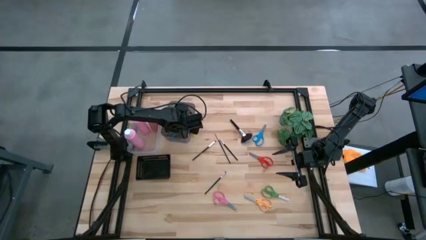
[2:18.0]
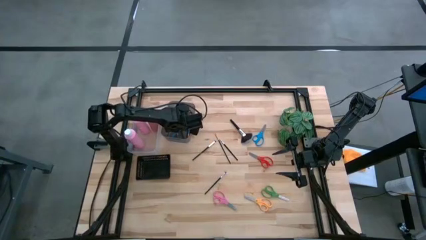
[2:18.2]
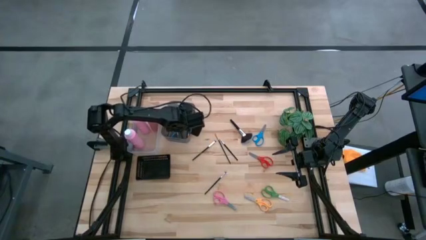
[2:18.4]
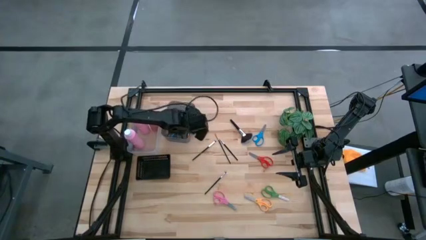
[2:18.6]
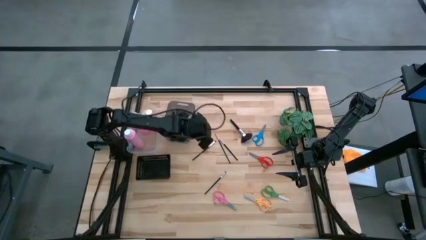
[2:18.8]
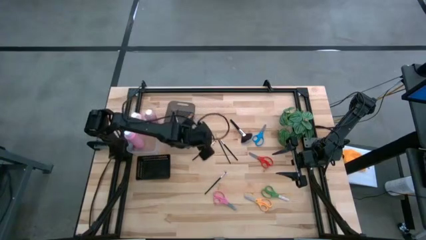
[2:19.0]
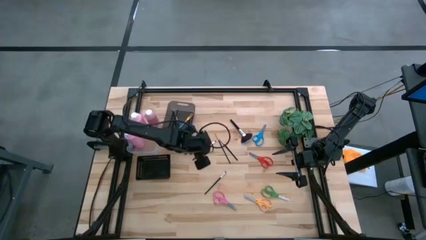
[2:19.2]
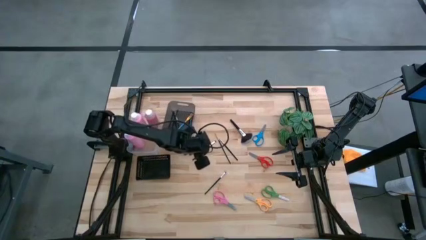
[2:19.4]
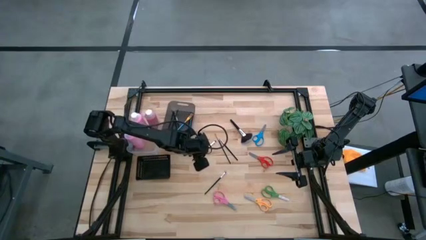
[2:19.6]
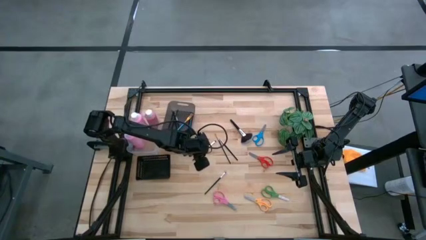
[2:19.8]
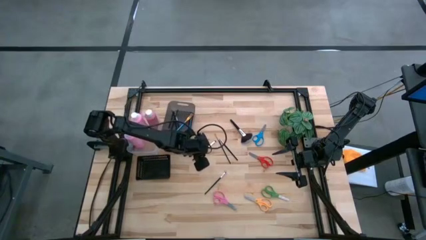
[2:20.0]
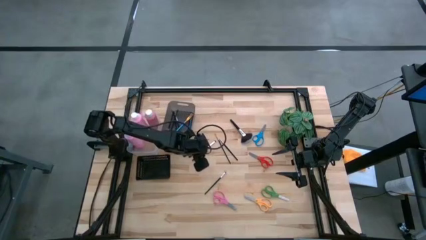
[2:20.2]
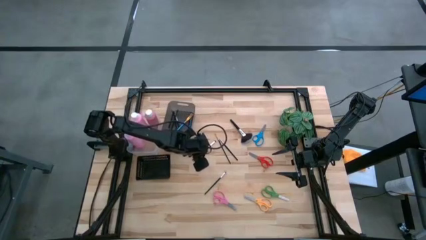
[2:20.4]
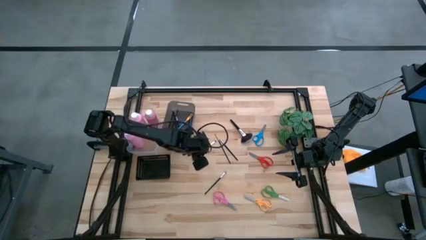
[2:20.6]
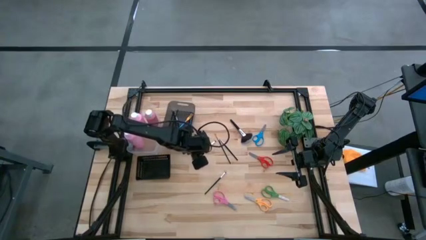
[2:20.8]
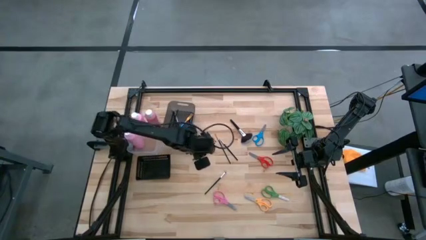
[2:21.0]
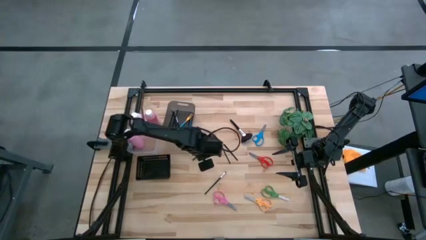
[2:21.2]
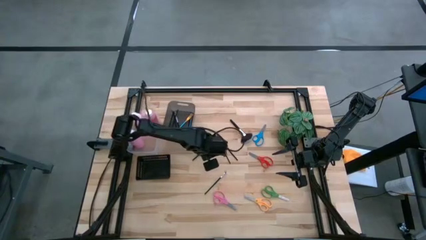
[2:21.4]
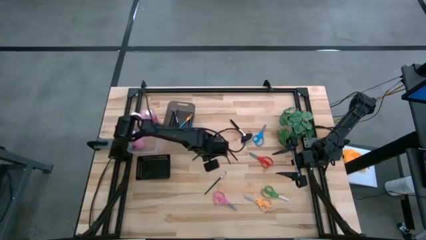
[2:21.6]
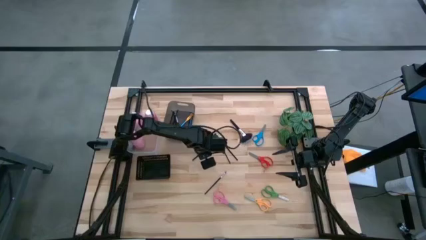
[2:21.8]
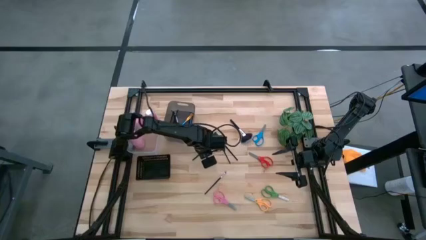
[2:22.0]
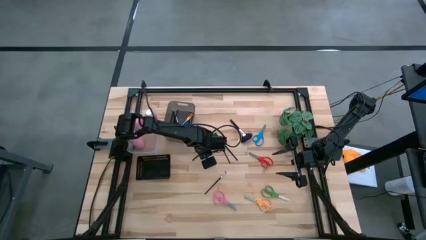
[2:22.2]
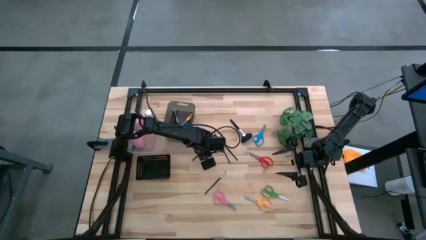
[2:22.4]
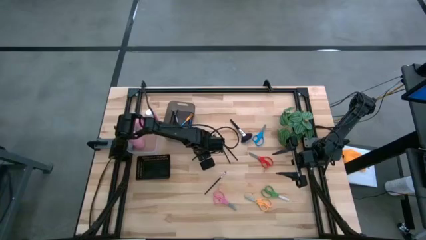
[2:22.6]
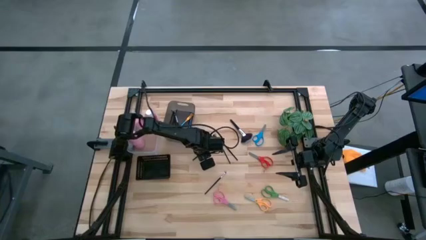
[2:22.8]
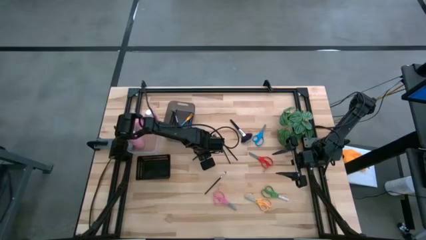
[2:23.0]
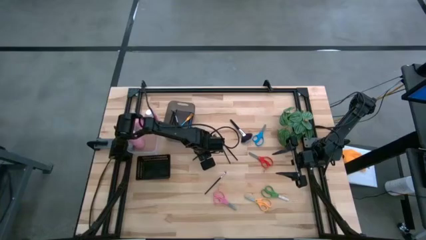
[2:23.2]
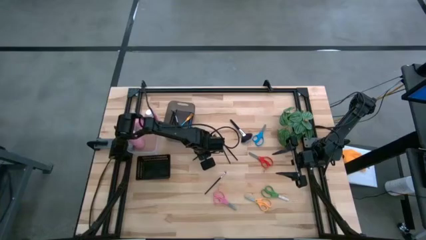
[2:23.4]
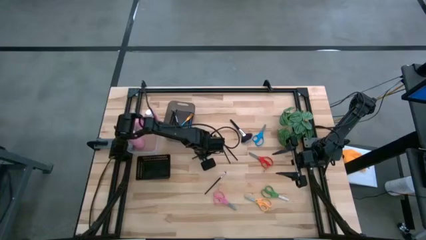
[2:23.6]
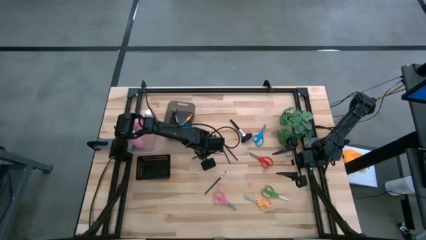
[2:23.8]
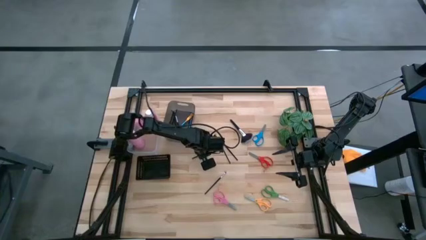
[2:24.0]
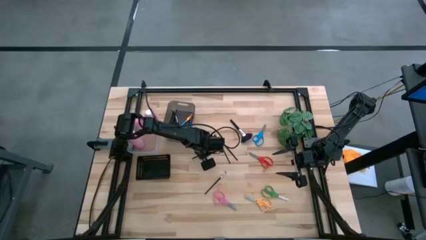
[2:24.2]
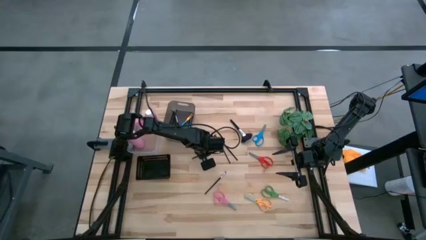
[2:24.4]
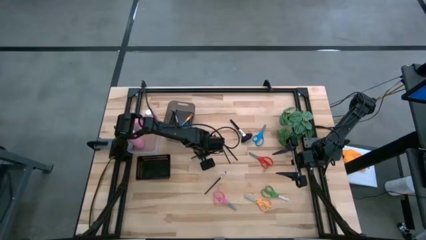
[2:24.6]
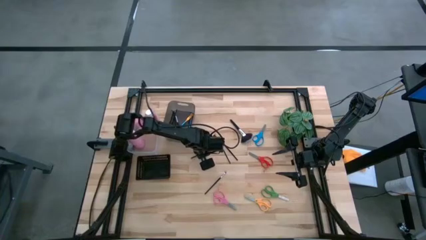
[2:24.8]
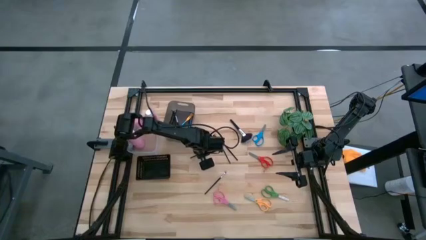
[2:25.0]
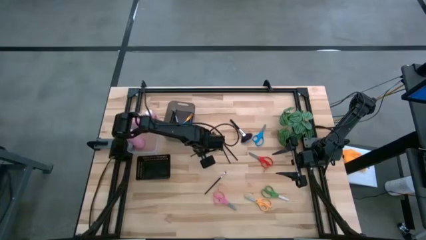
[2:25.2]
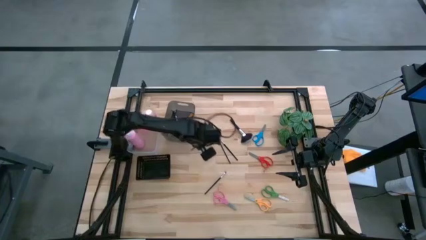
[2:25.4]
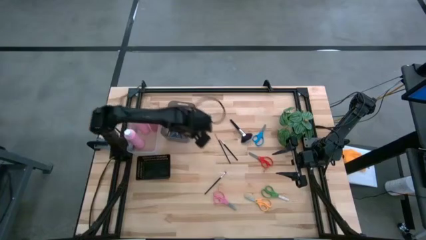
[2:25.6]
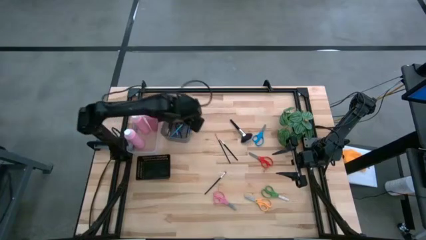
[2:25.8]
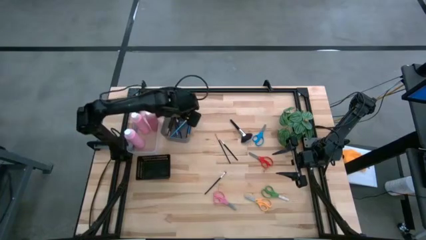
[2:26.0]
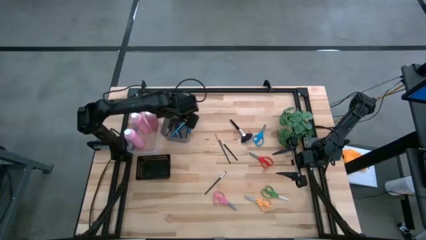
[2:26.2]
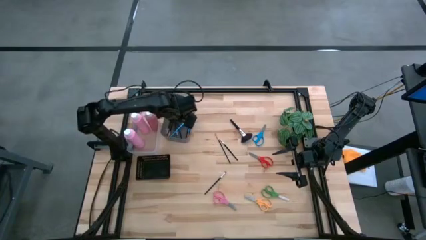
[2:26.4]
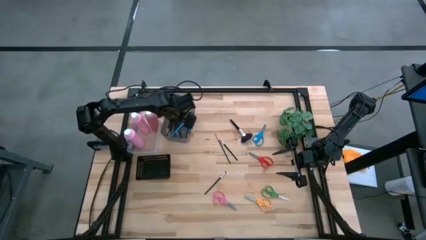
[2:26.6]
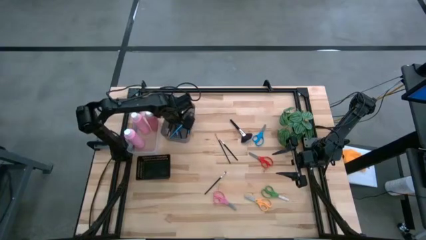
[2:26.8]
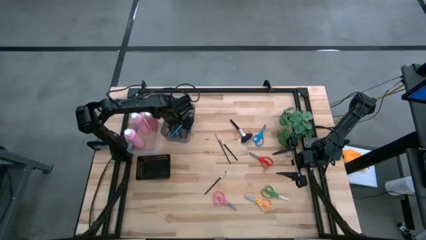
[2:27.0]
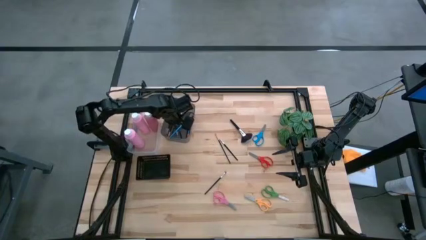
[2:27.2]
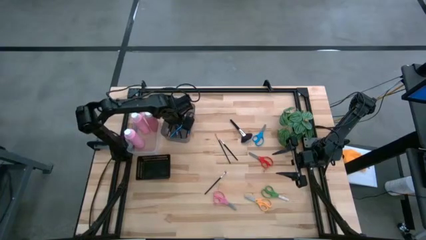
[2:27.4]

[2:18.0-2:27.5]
Task: Pick & Place Paint Supplies
Put the black brush into the black bin

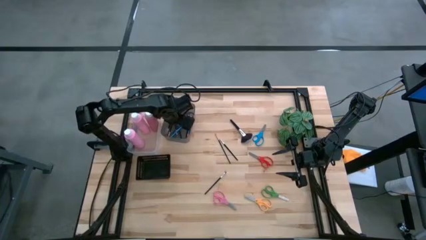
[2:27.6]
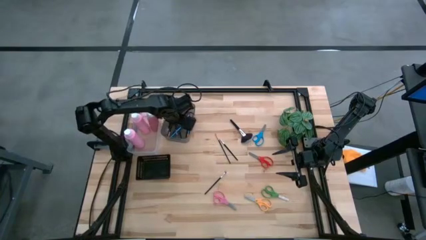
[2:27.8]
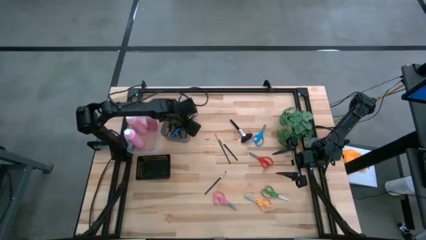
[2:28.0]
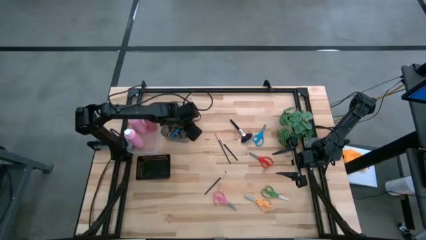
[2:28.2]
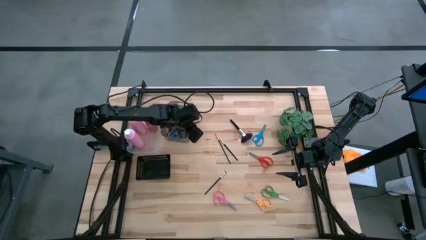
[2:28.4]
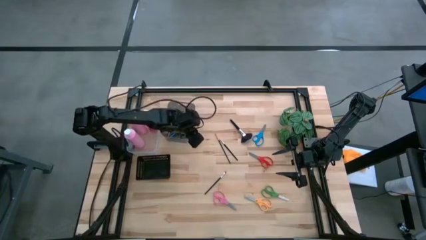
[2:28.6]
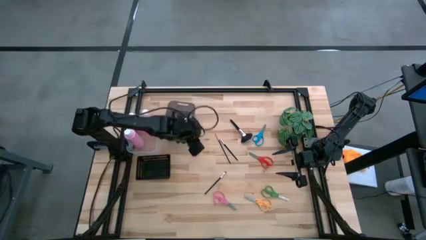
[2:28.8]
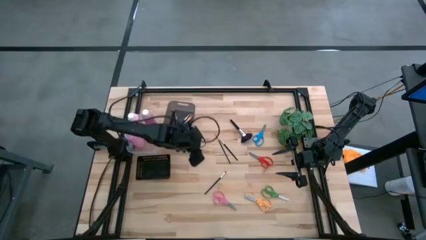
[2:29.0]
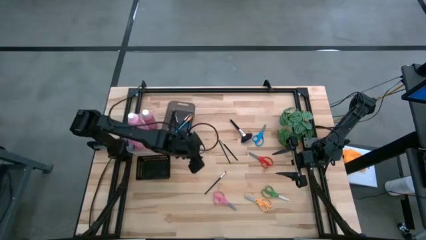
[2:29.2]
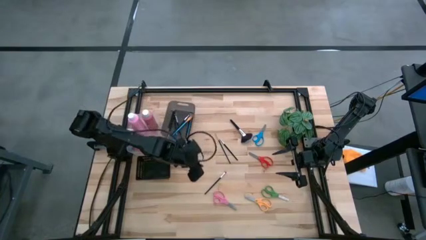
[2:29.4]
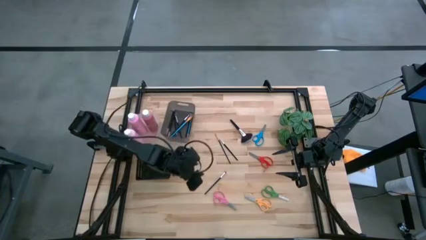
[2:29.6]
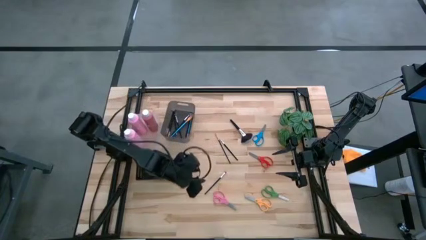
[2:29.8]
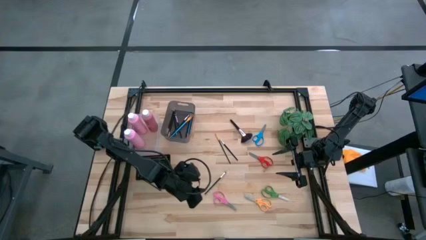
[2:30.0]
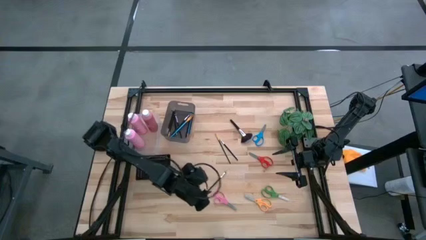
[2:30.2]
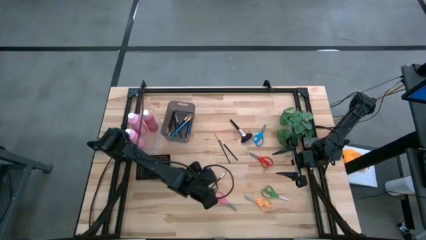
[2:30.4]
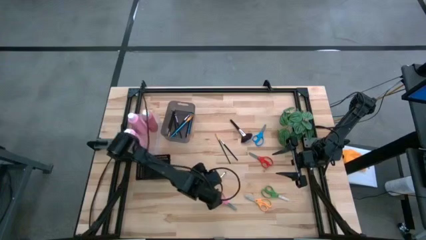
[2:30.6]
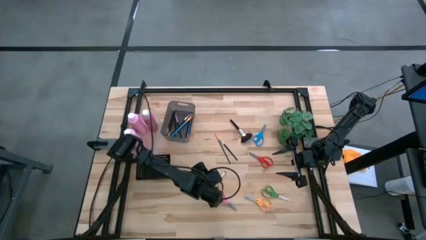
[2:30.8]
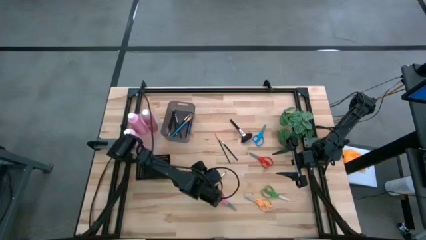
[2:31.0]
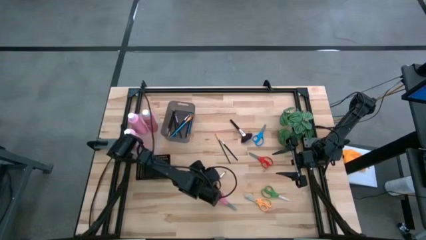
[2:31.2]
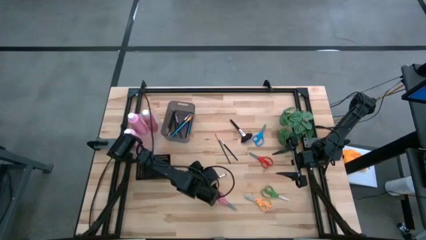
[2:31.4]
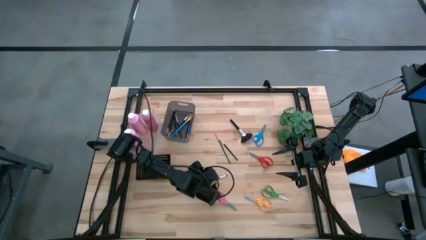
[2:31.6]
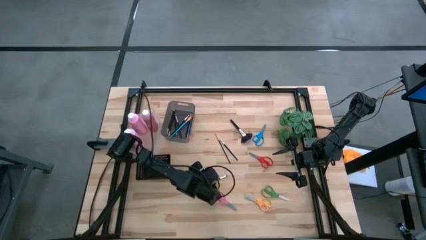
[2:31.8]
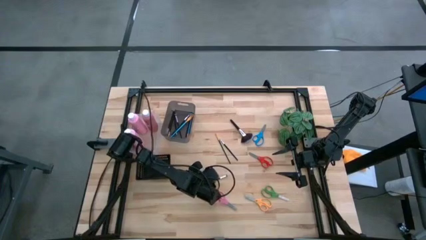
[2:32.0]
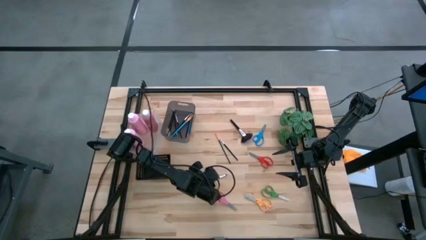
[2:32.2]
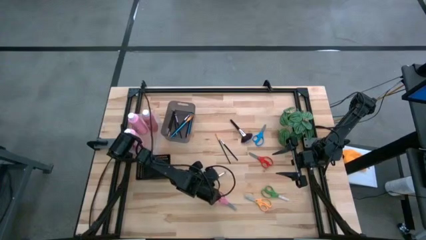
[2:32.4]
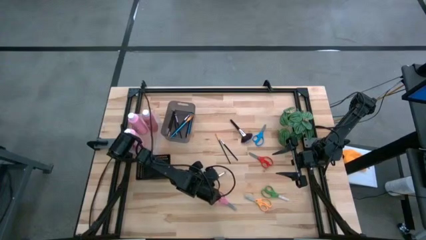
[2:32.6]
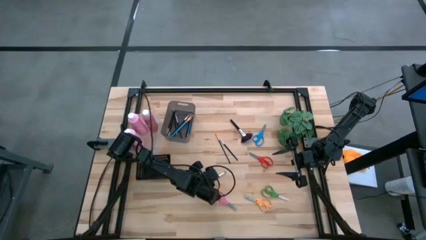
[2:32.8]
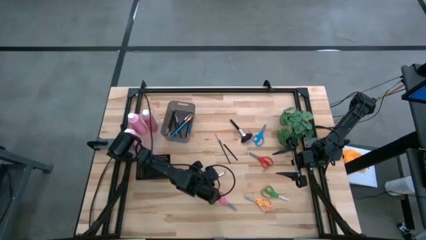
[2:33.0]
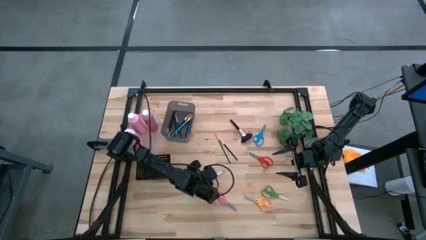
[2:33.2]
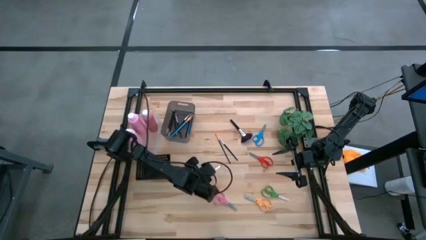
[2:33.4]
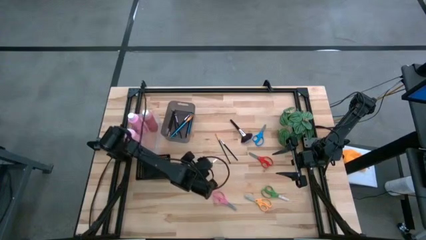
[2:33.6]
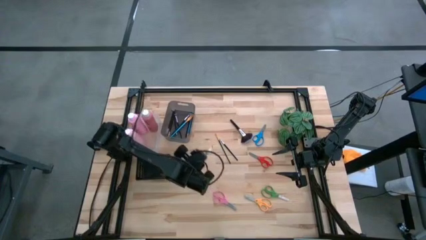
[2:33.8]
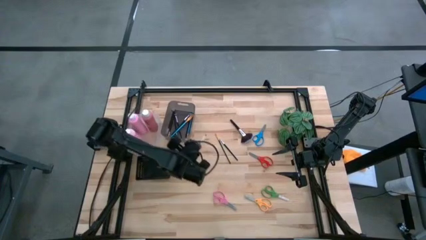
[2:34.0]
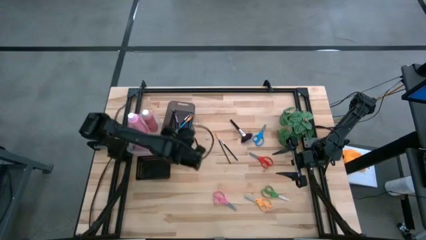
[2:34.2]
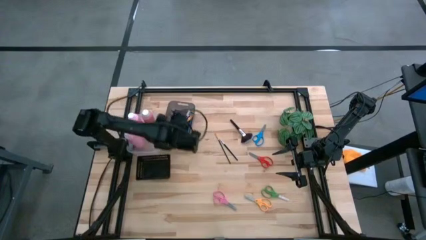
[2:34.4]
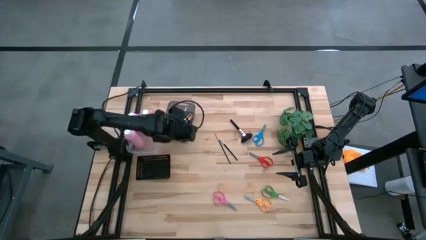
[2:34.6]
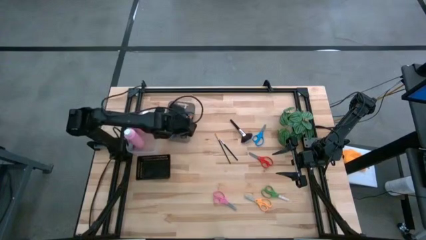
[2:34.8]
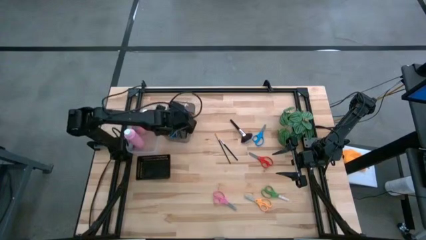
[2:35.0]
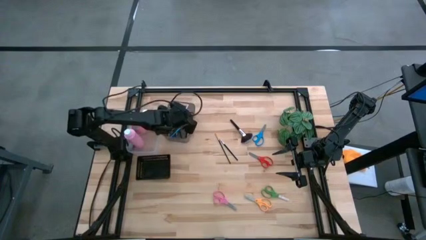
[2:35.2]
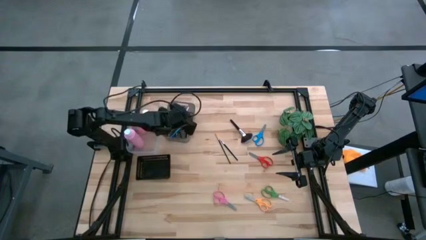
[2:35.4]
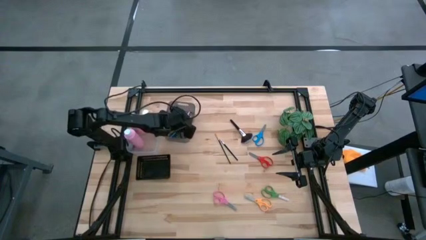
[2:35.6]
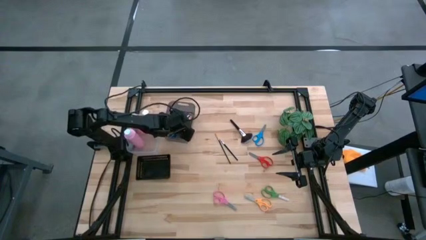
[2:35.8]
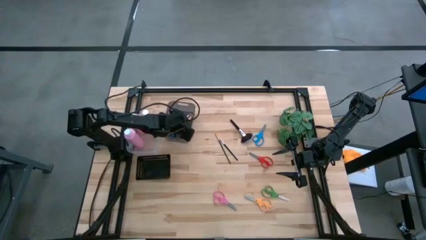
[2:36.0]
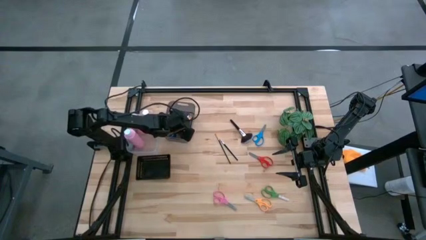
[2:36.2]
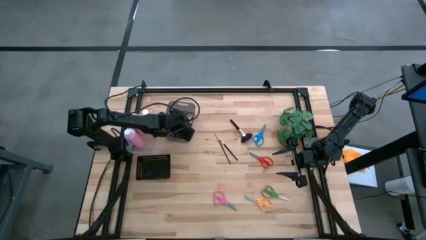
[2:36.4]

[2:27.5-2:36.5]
Put the black brush into the black bin
